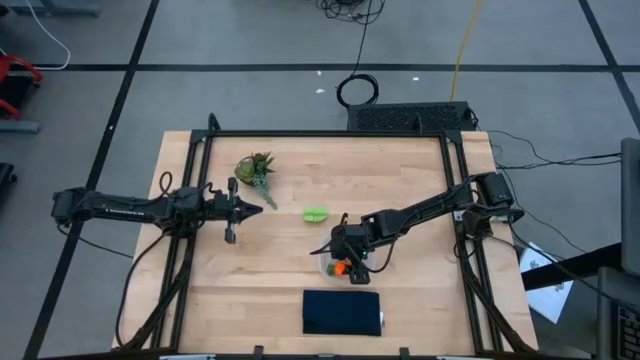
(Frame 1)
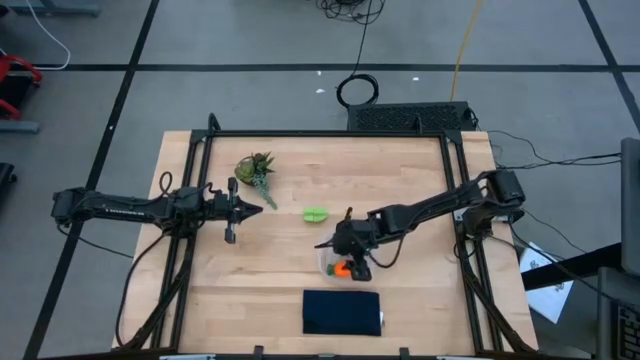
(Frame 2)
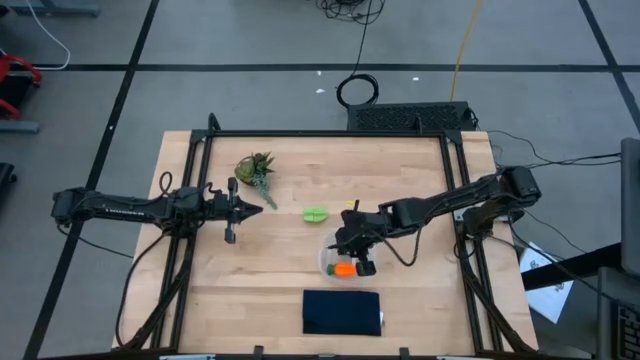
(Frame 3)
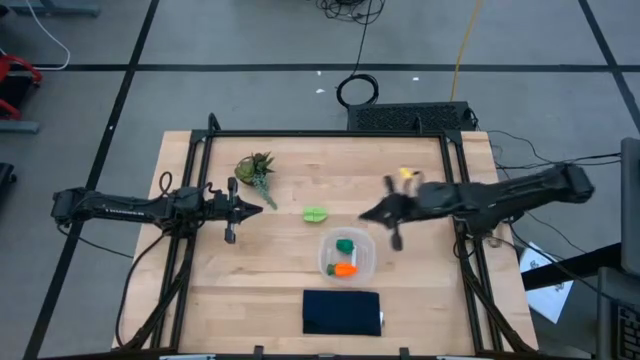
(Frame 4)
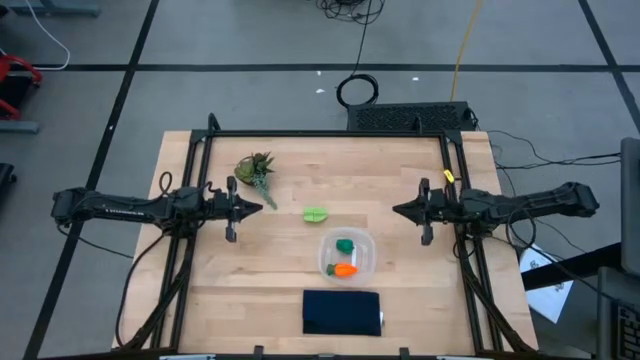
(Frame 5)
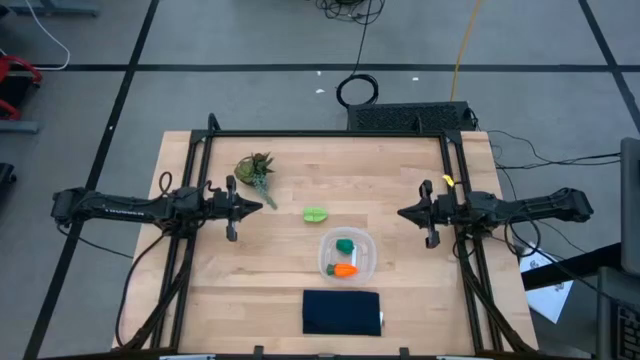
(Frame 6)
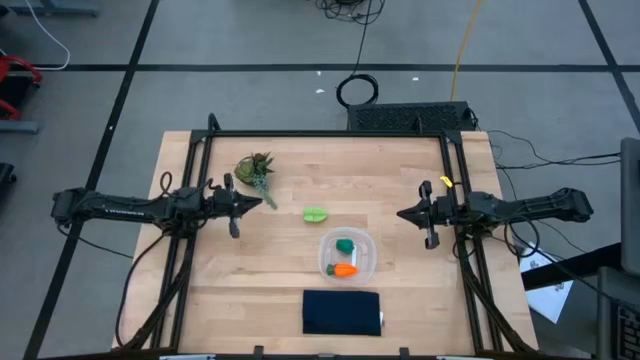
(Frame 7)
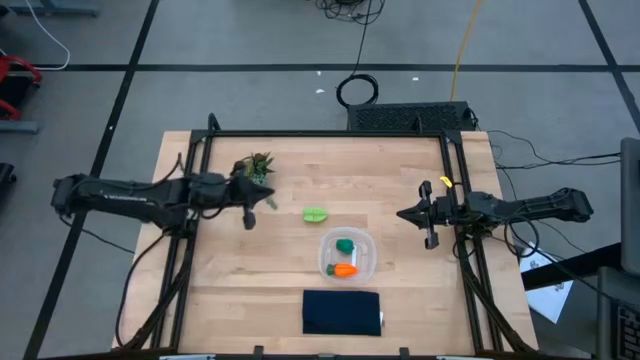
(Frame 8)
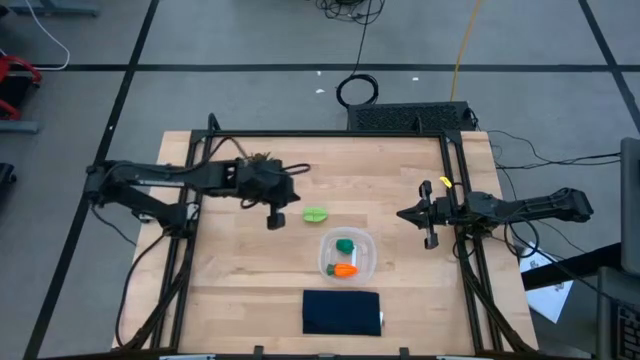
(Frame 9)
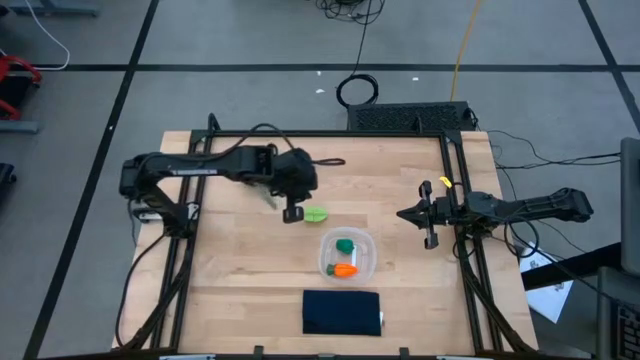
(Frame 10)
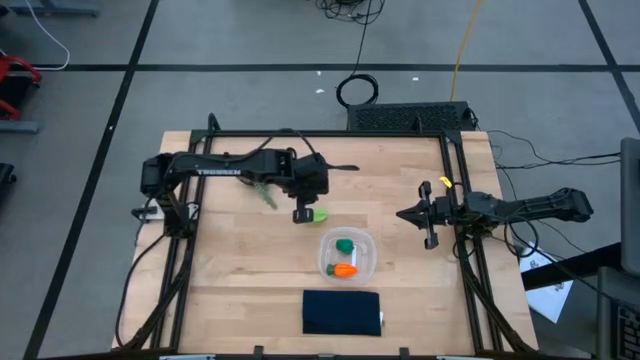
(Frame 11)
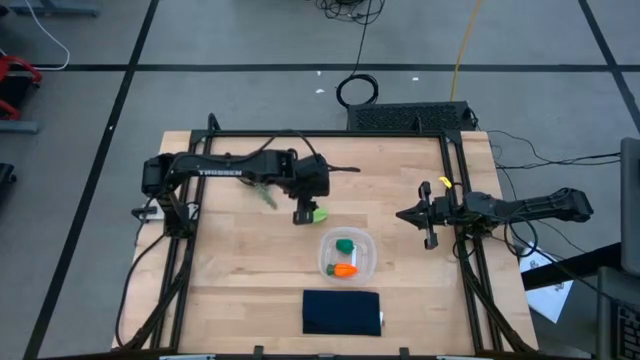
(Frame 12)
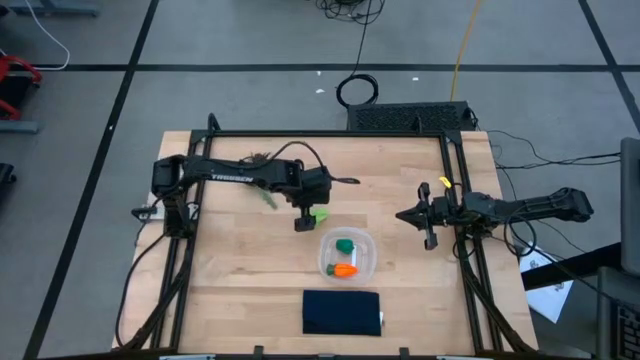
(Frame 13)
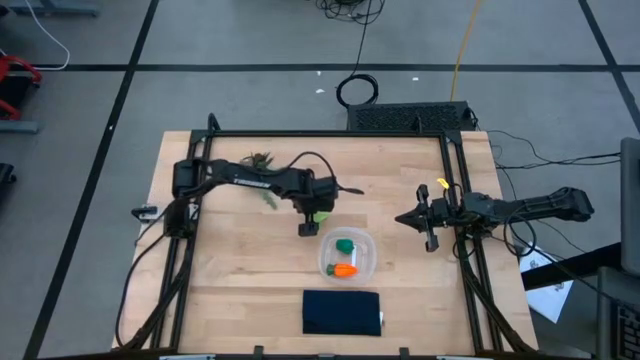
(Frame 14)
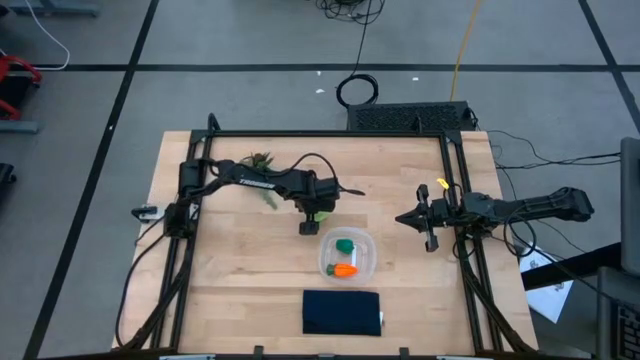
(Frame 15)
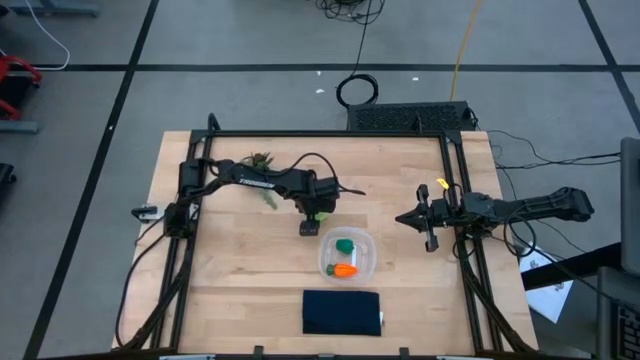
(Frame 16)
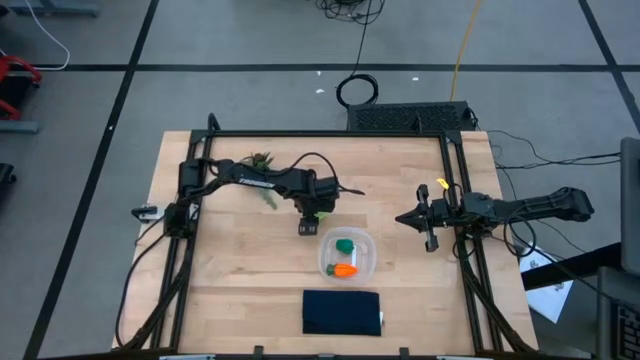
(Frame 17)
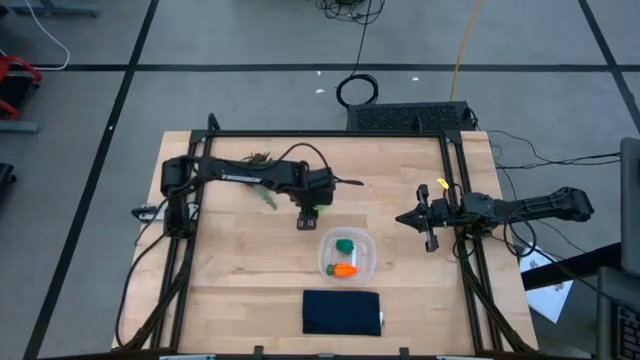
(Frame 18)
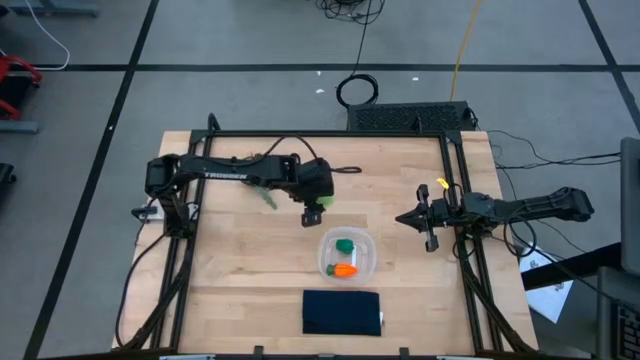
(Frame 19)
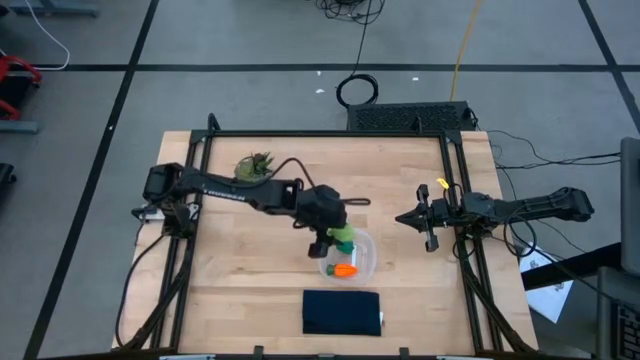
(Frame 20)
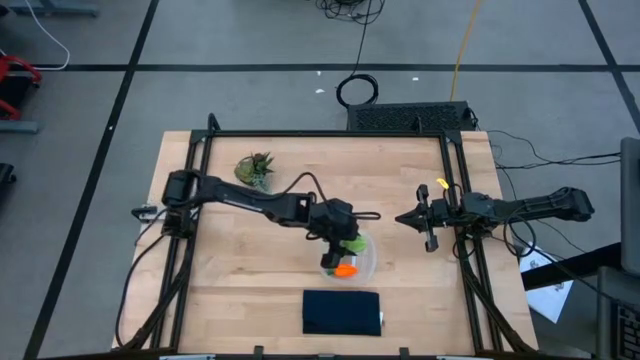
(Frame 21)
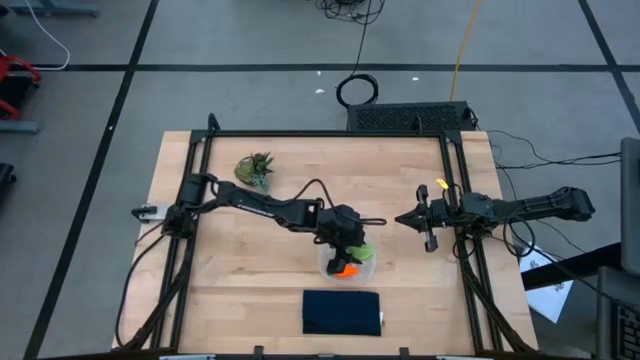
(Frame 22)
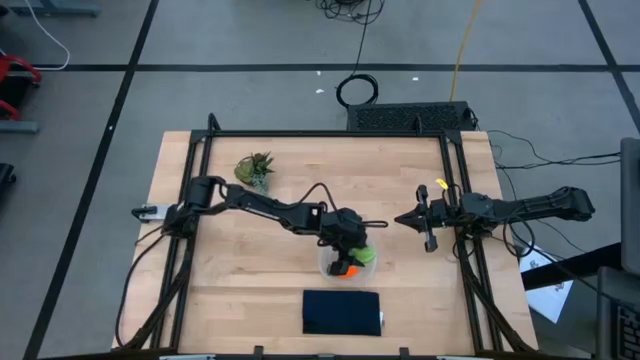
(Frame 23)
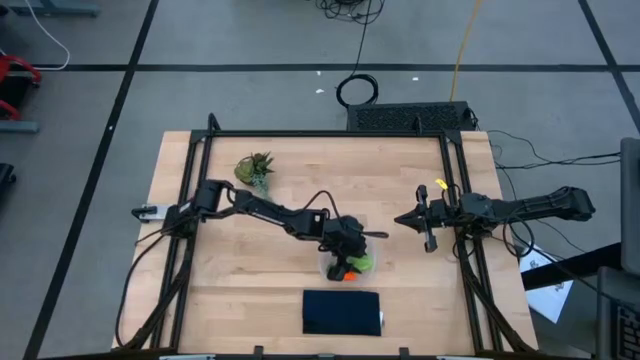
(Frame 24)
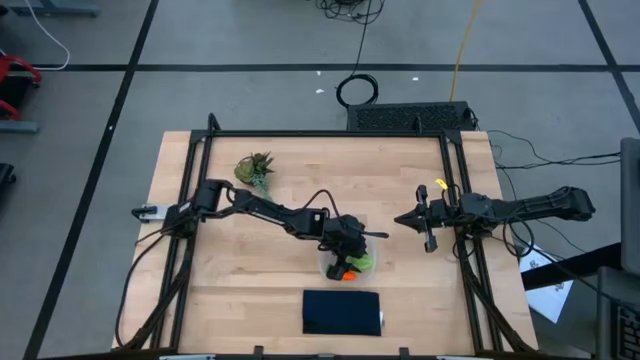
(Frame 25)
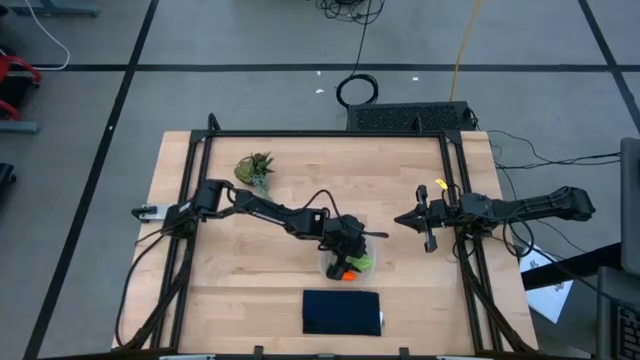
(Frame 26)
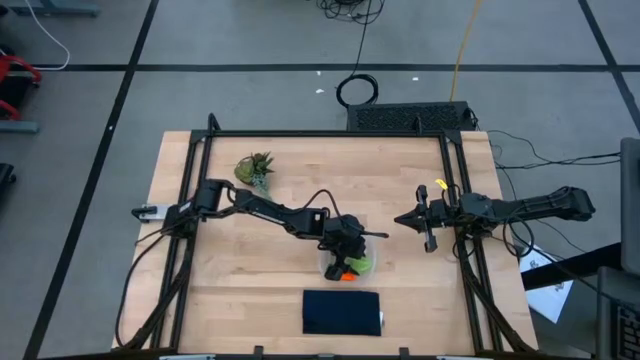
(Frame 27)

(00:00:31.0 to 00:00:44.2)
Task: Pick and placing Produce into tupperware
Put the green star fruit into the transparent bin

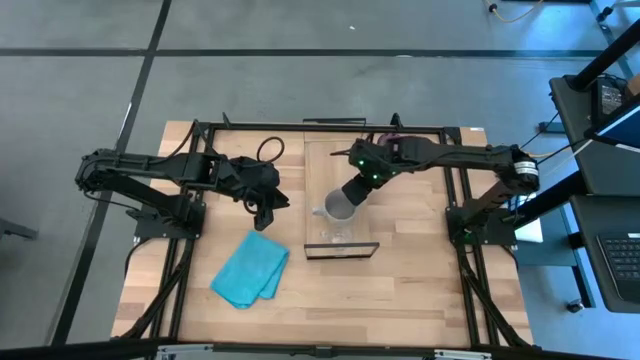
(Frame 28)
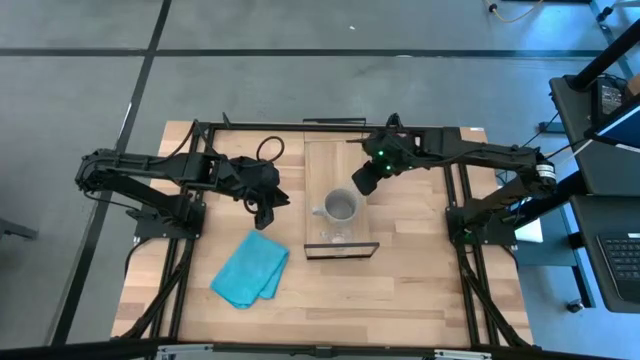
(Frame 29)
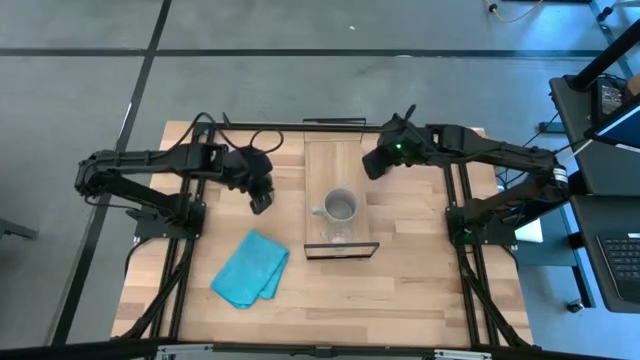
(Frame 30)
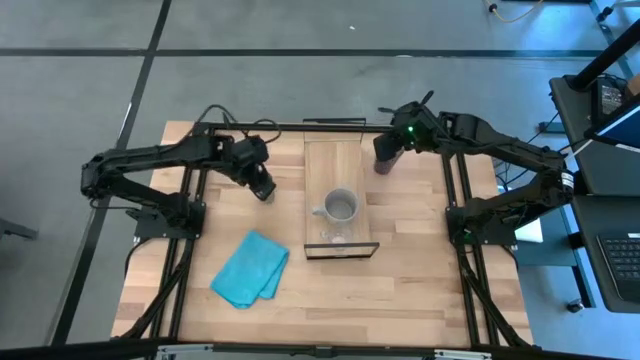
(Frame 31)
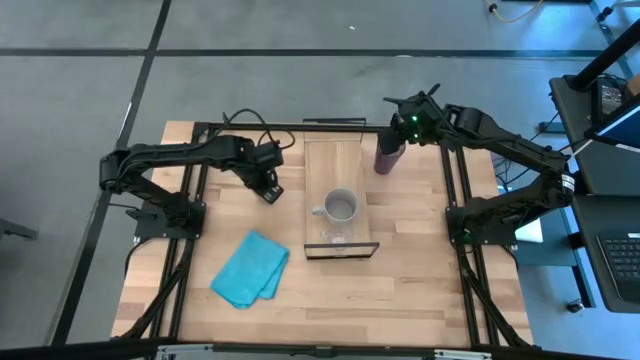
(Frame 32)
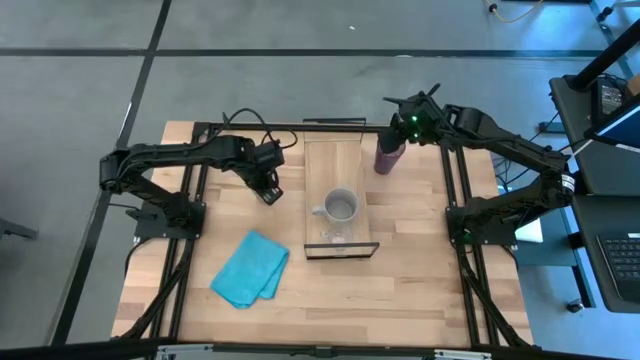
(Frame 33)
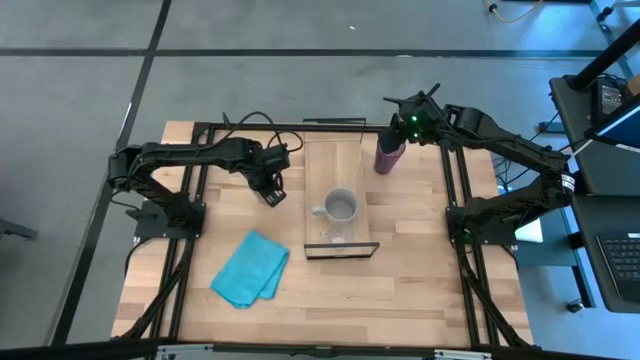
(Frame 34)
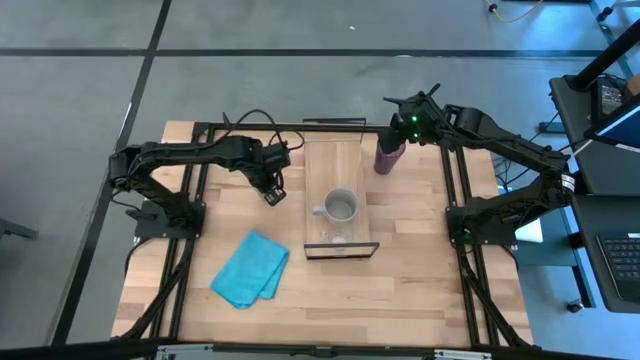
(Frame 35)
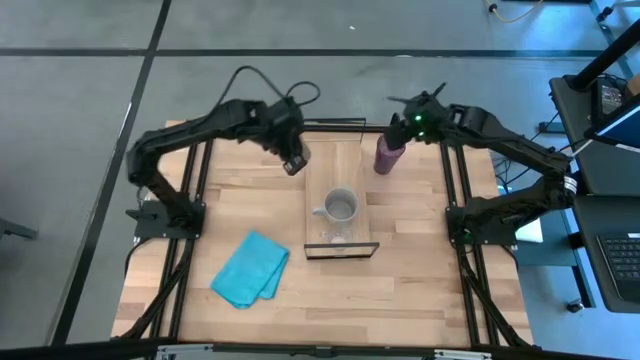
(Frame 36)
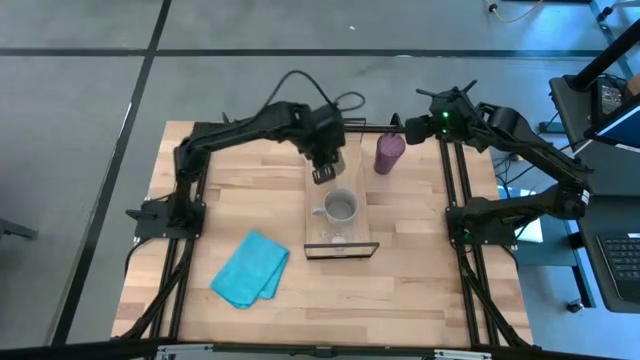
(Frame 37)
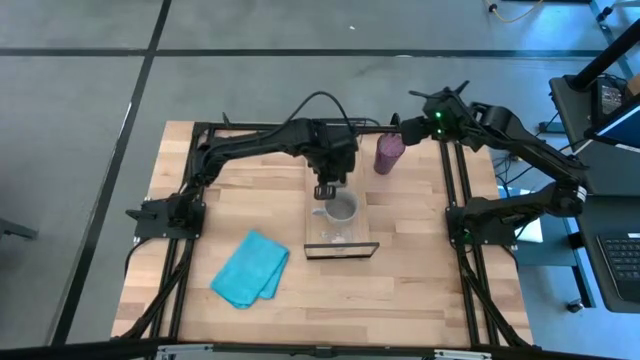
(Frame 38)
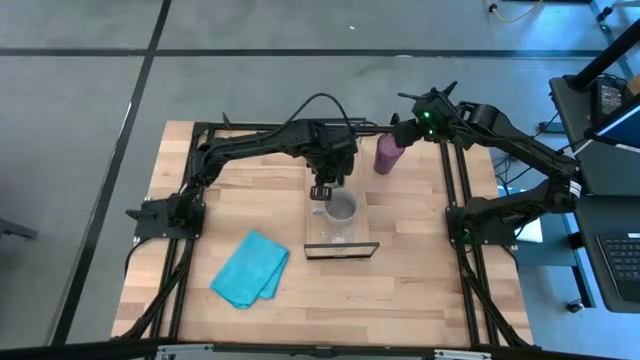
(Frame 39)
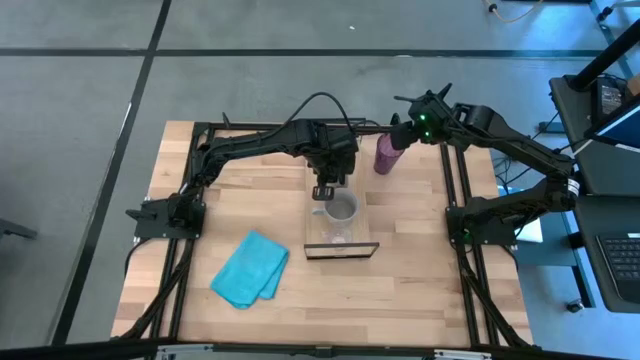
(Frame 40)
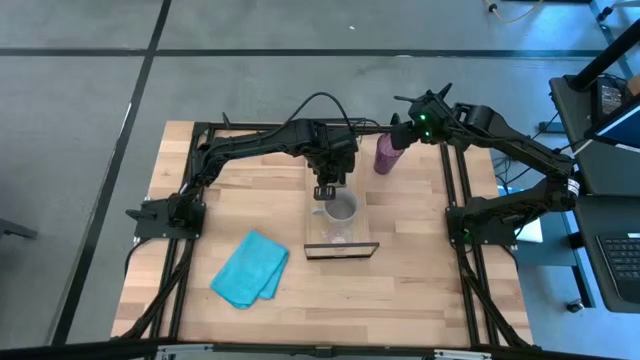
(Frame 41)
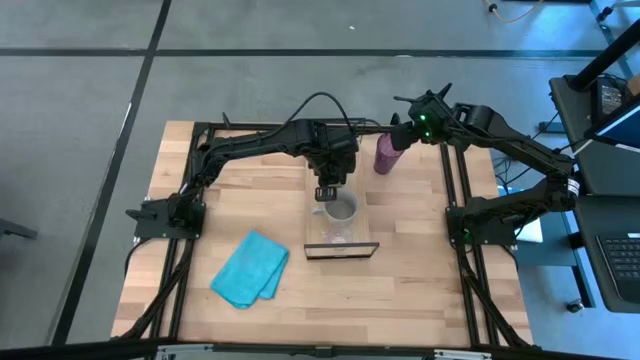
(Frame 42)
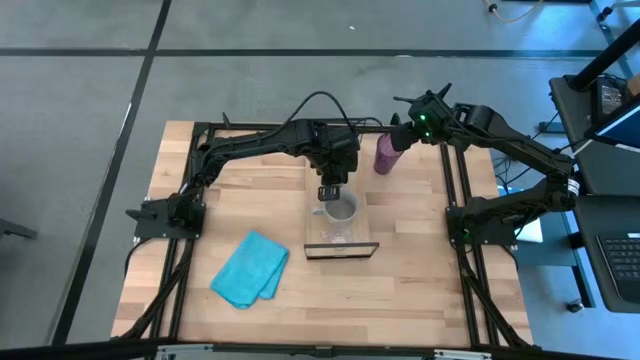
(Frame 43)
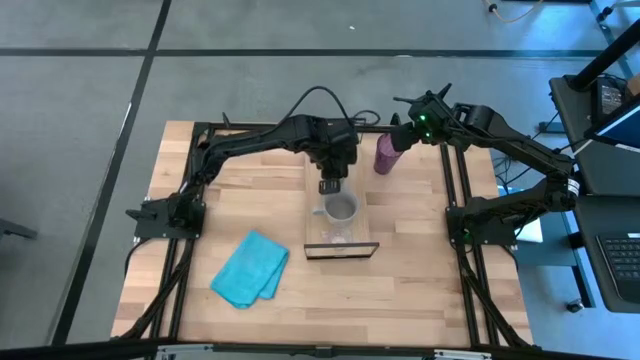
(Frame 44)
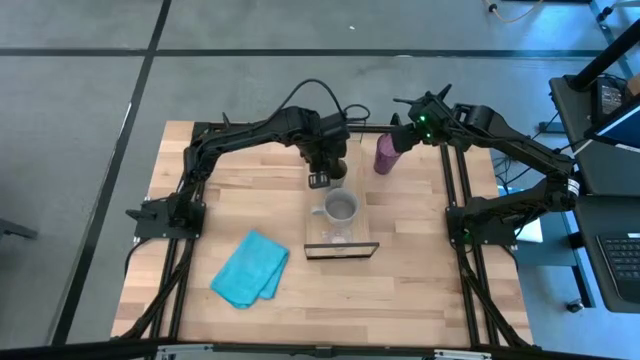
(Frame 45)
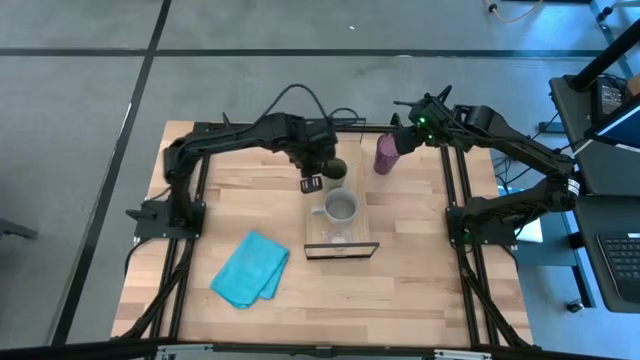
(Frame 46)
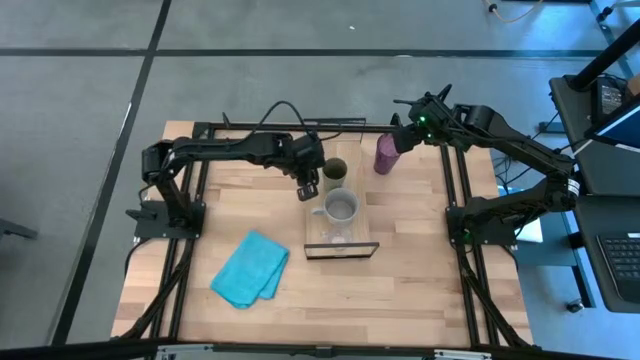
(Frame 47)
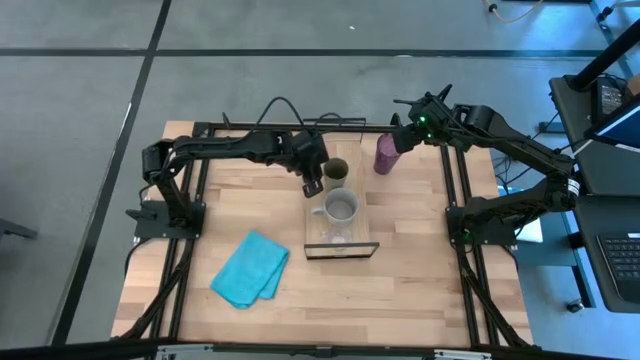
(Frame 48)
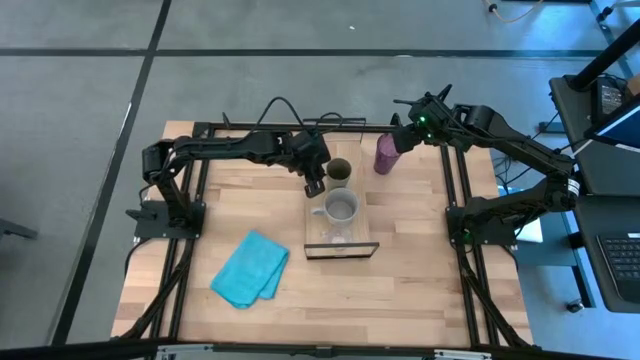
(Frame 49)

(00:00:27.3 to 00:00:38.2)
Task: Stack small to large cups/mugs on shelf
Put the light green cup on the shelf
